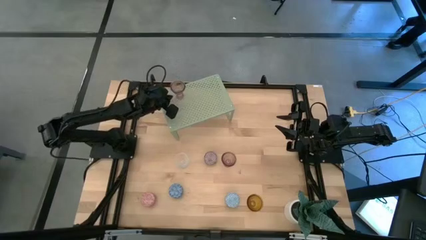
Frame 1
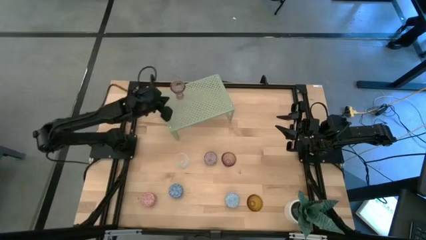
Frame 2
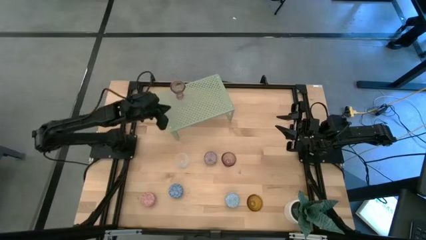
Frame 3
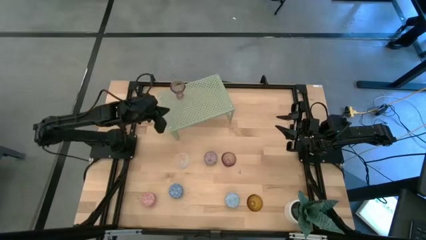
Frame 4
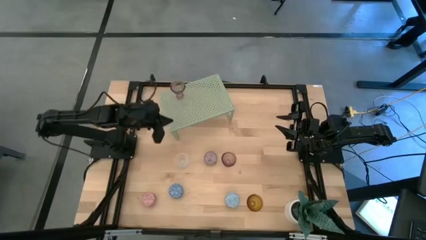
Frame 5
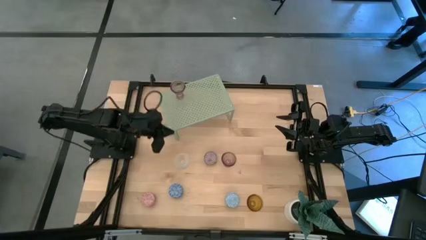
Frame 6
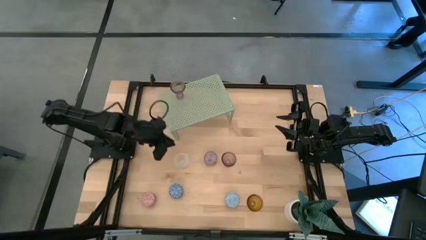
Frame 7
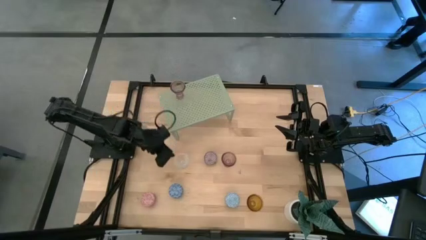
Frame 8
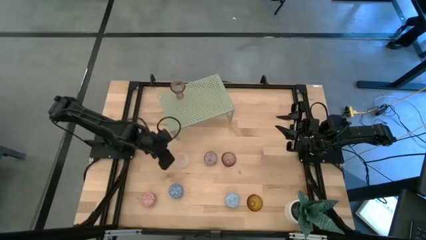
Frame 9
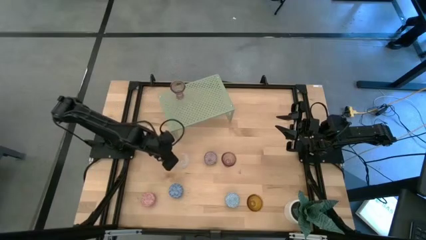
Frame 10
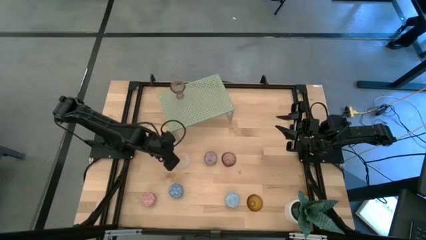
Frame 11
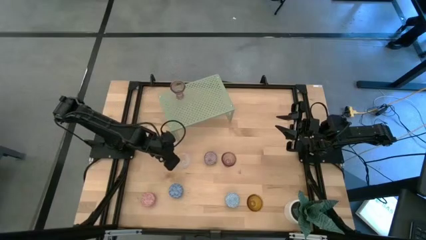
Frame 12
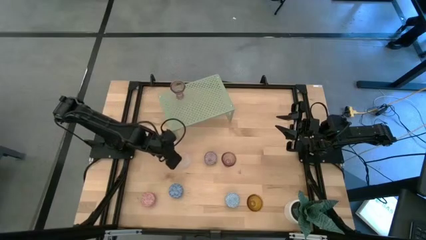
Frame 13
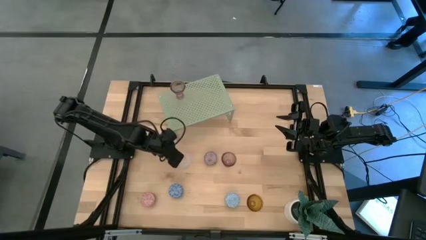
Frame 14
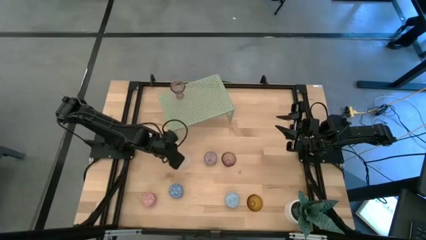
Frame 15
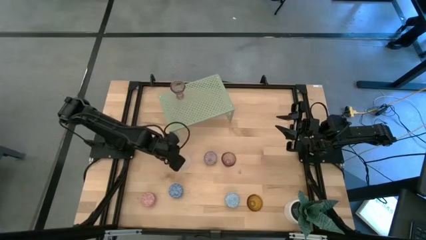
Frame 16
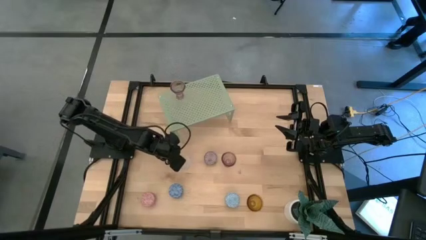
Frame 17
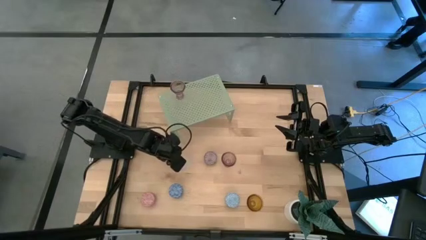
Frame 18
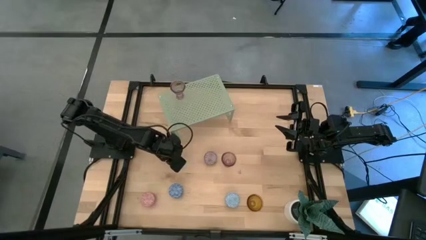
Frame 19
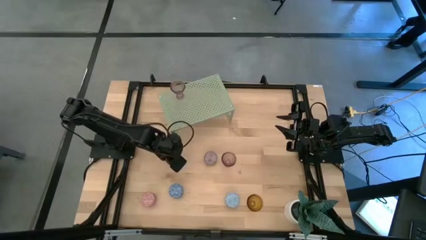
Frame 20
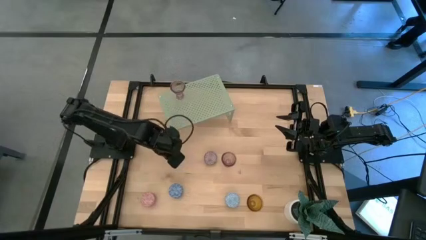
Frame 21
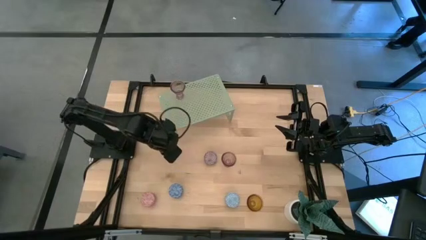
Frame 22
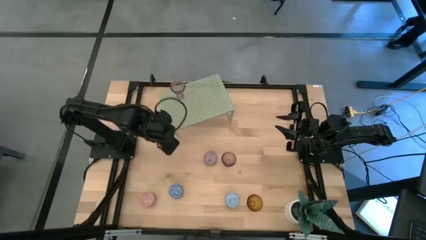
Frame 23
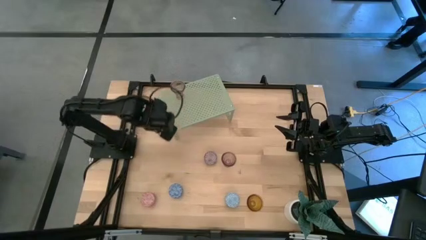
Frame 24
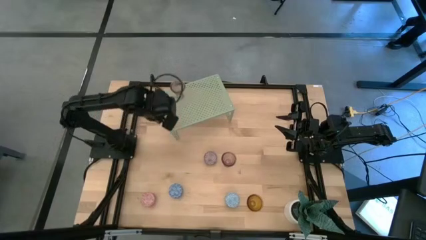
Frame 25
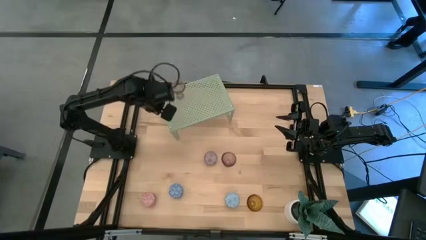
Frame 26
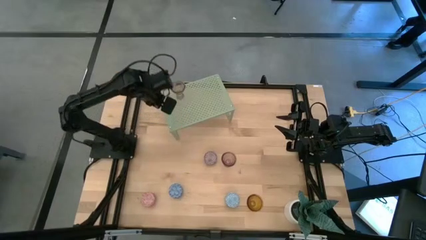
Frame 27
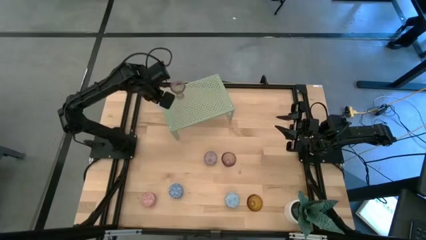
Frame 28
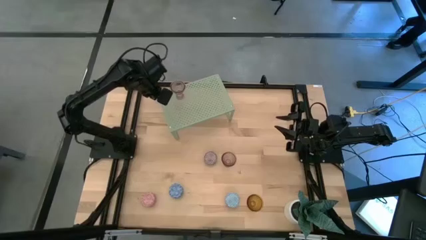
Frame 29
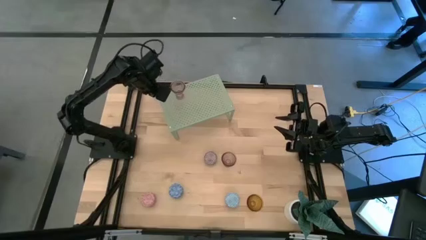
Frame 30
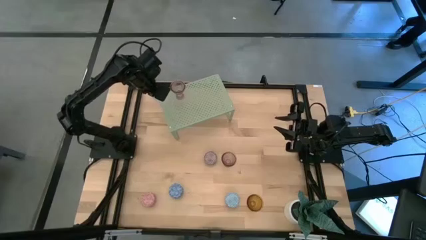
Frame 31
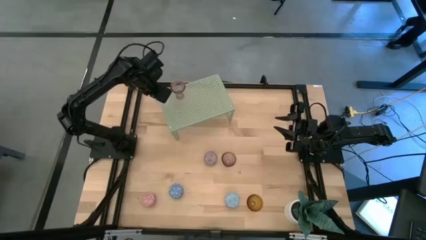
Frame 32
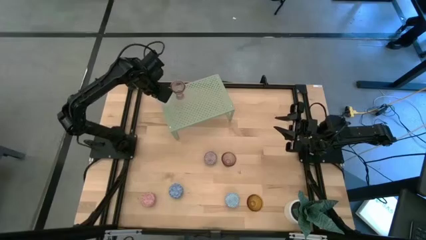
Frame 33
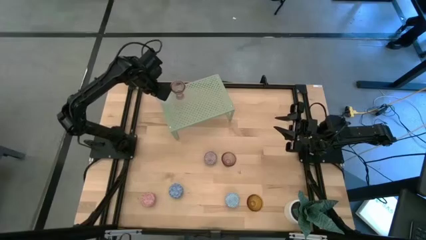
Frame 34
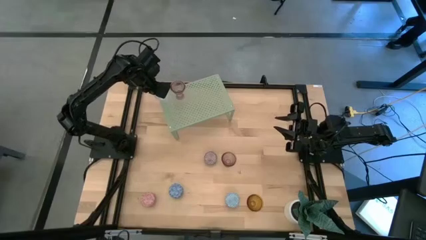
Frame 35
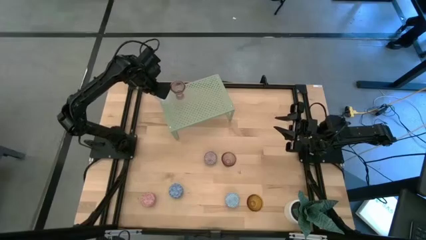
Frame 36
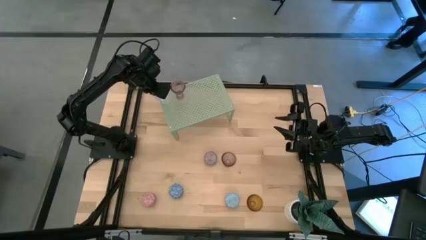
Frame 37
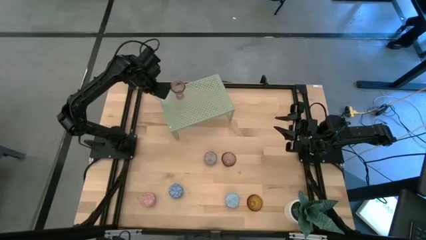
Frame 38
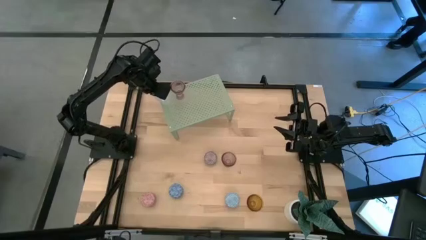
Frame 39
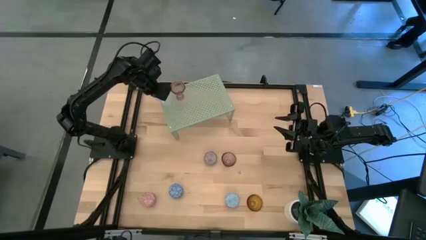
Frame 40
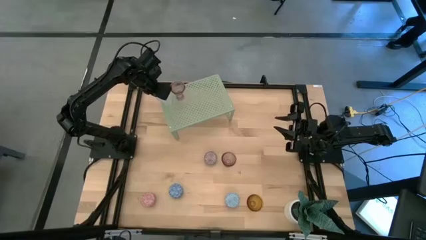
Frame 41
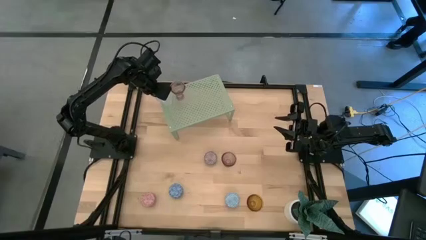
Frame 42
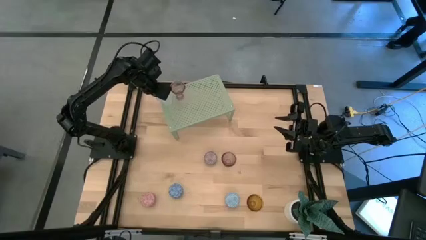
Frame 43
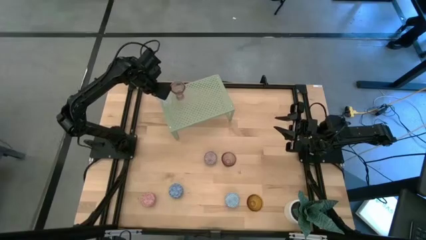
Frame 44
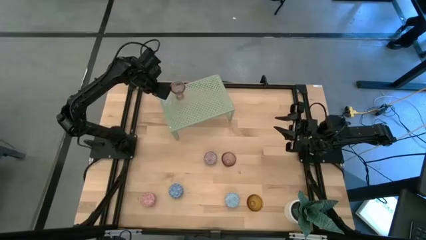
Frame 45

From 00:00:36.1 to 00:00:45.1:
Task: Pick & Place candle stick holders
Put the transparent glass candle holder on the shelf aligned with the other glass candle holder

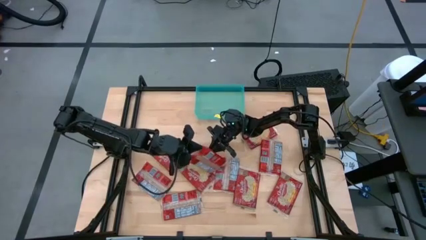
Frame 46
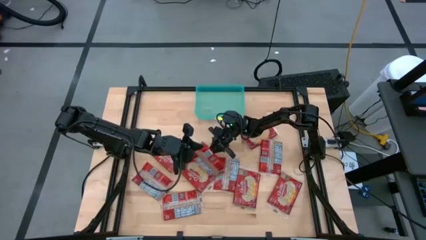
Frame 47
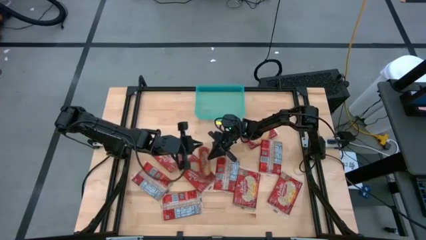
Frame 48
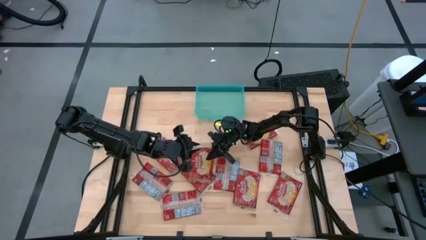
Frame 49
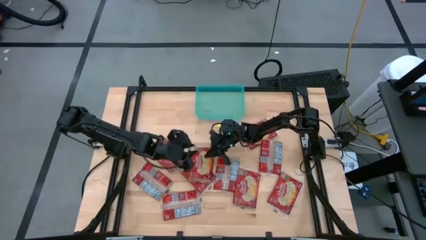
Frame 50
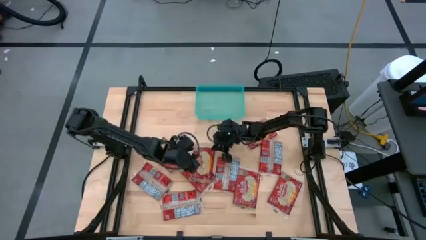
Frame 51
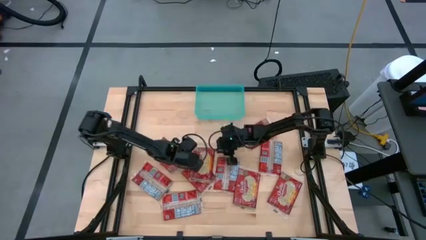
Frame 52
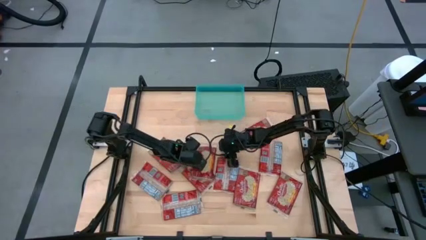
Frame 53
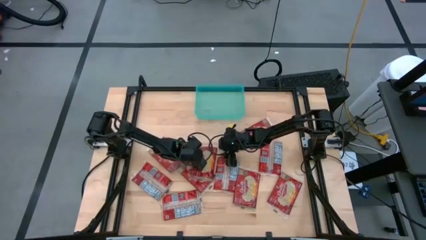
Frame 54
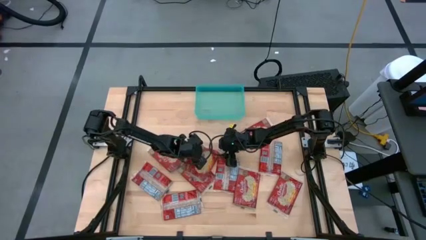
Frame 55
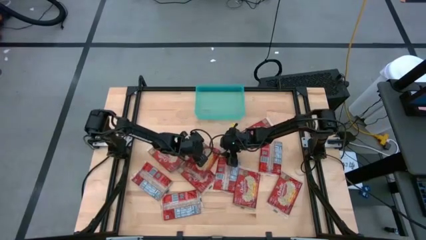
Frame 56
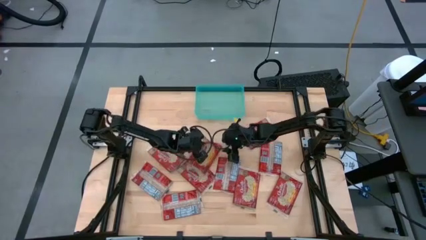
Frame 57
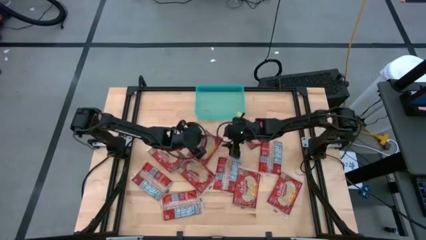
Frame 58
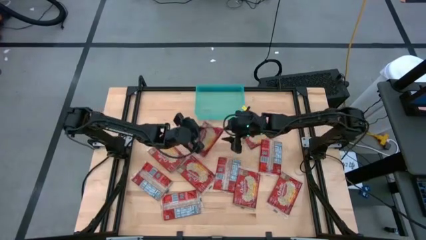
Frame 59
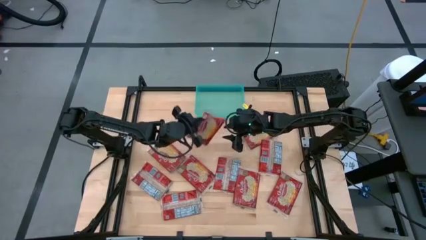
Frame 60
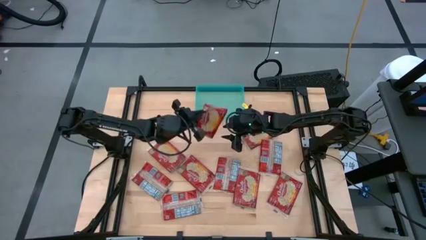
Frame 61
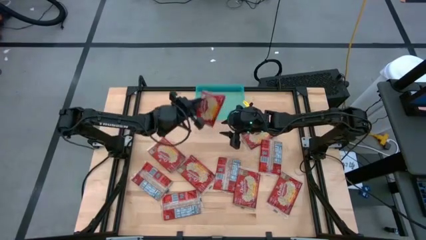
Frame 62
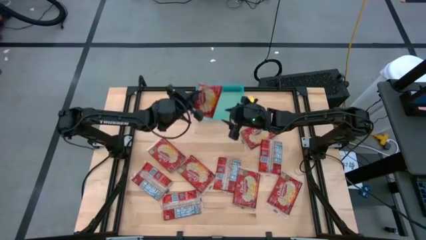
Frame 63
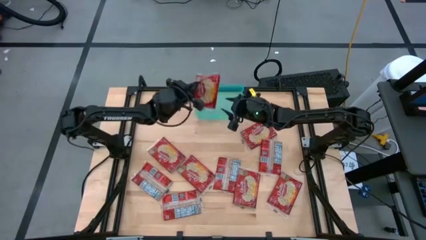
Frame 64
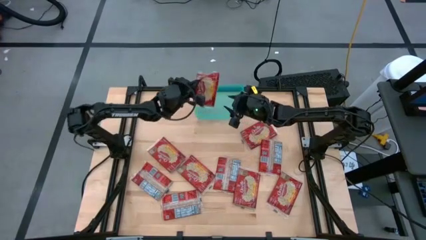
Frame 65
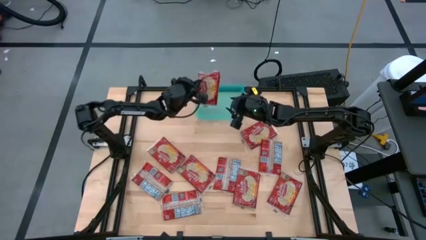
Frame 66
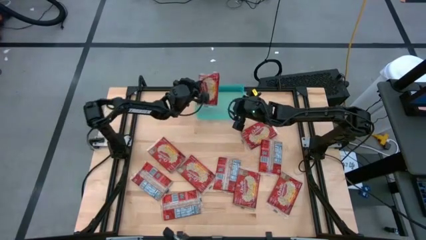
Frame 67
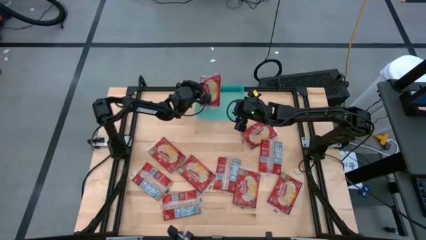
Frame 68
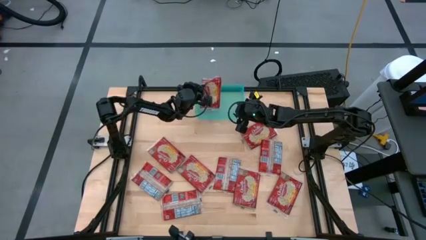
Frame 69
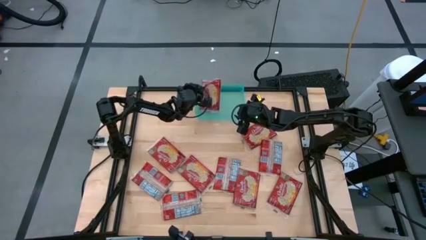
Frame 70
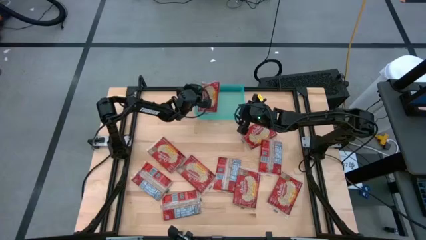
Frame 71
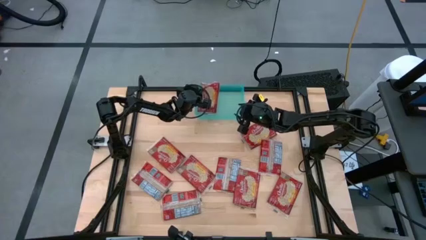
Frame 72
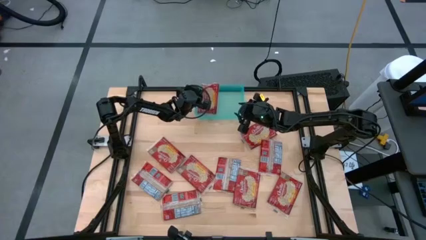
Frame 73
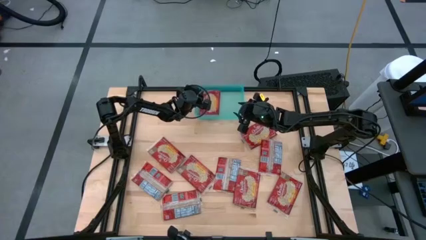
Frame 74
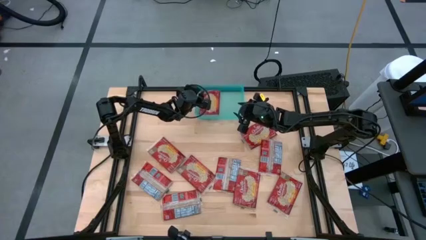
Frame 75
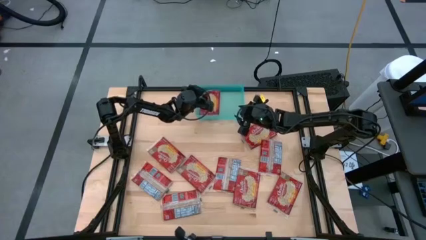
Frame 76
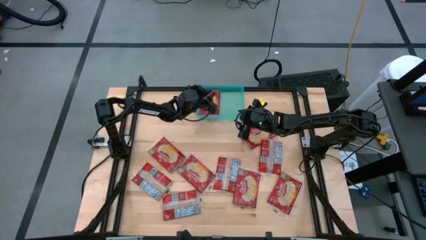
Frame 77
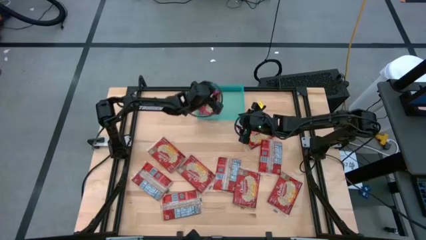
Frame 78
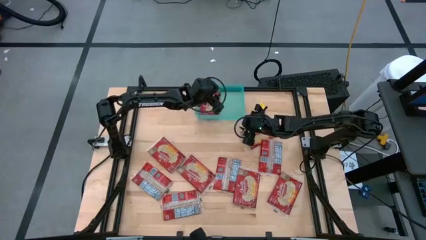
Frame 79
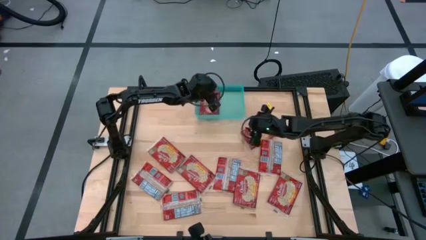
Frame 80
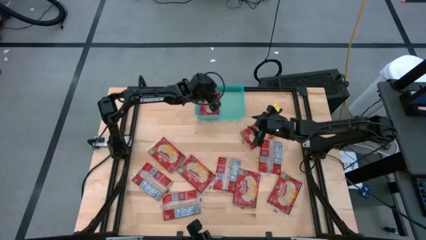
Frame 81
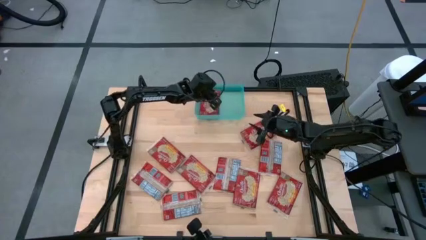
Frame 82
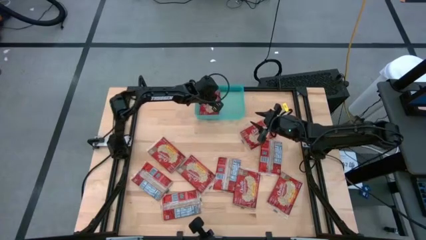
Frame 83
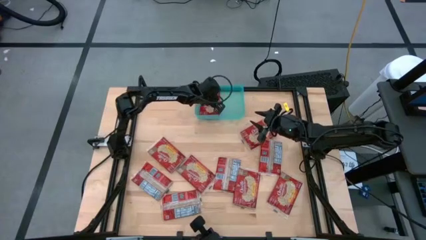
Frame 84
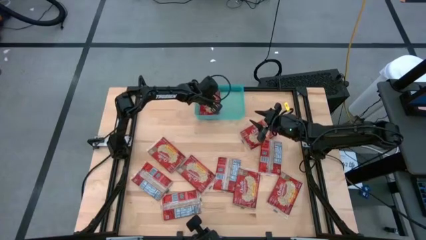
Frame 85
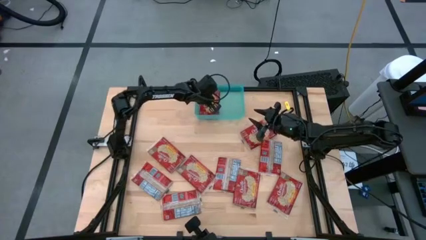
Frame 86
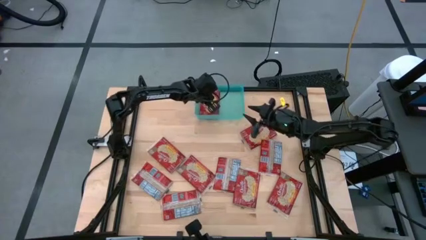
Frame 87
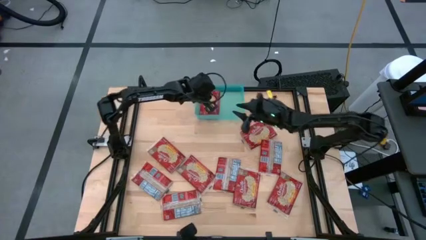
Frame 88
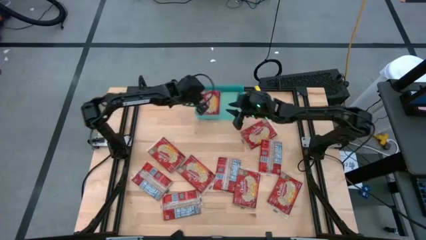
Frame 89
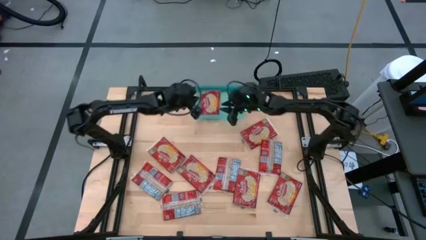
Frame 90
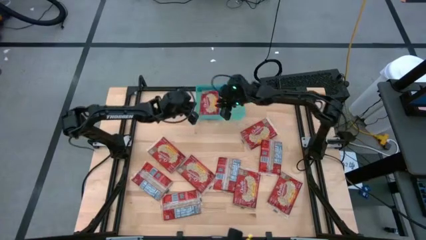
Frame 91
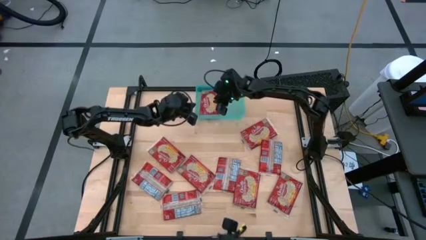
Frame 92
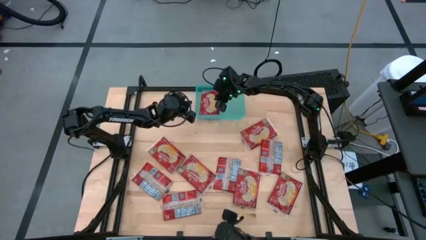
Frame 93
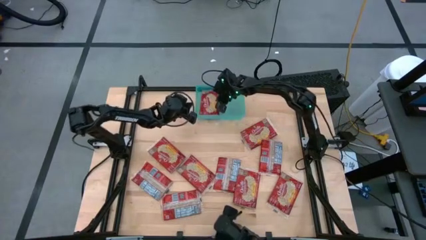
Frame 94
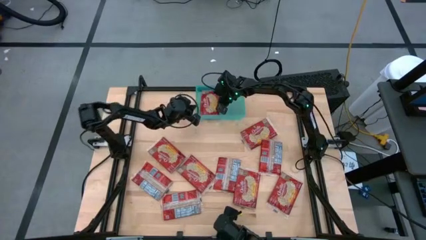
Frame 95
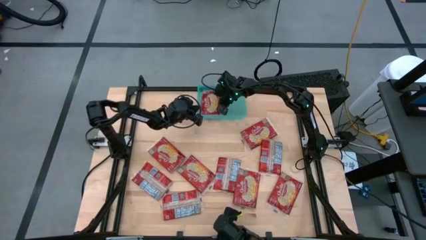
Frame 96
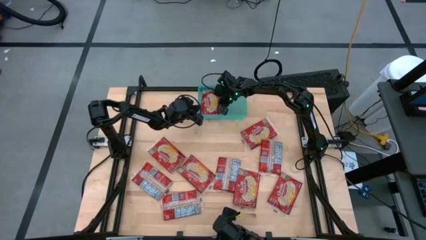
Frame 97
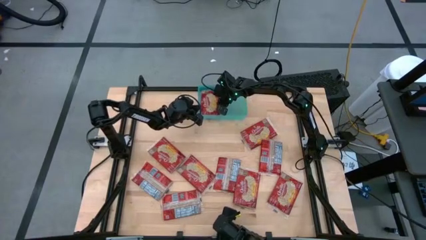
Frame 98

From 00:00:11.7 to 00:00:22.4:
Task: Sort popcorn bags into baskets
Put the red popcorn bag into the blue bin
